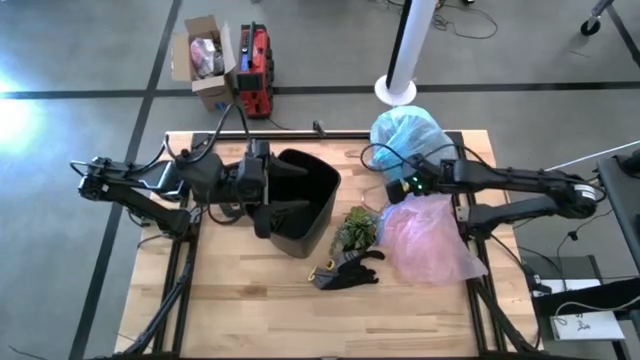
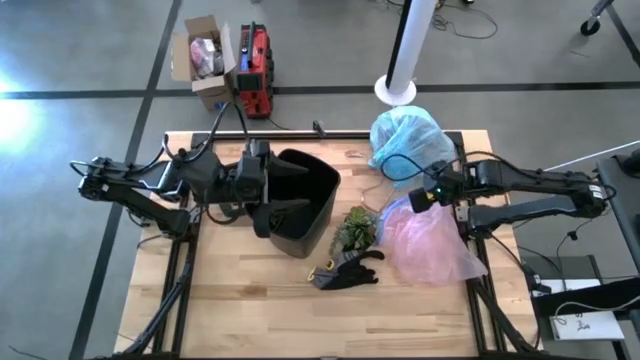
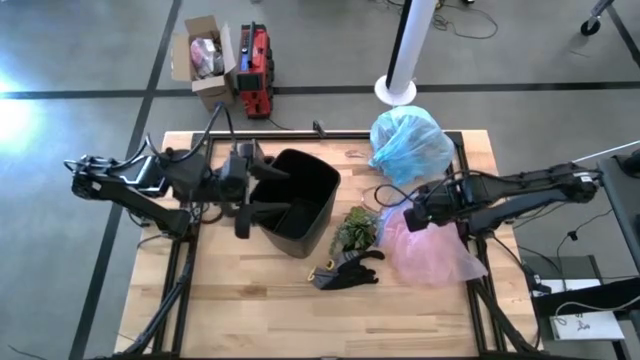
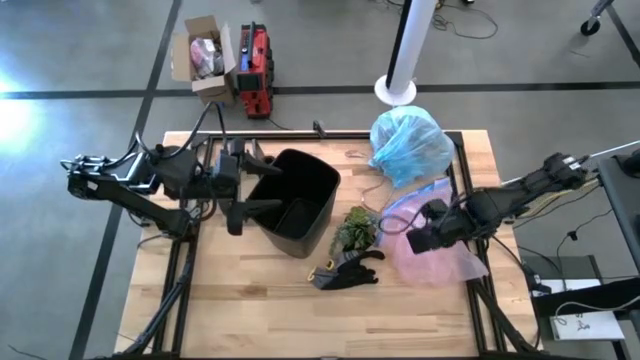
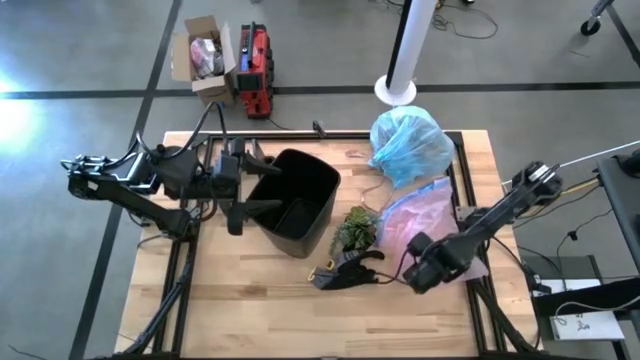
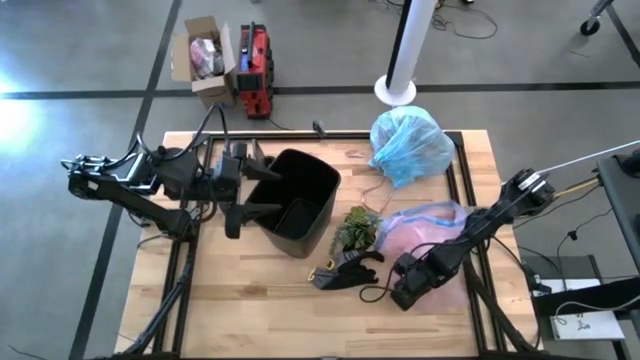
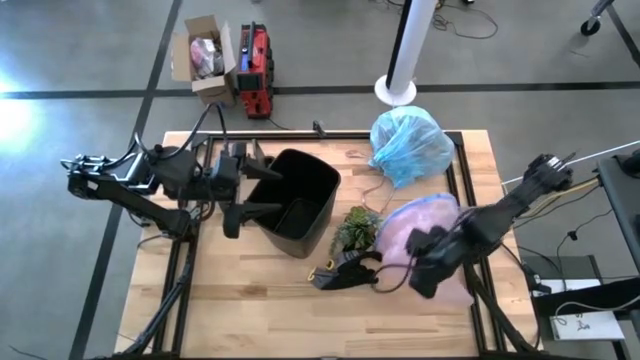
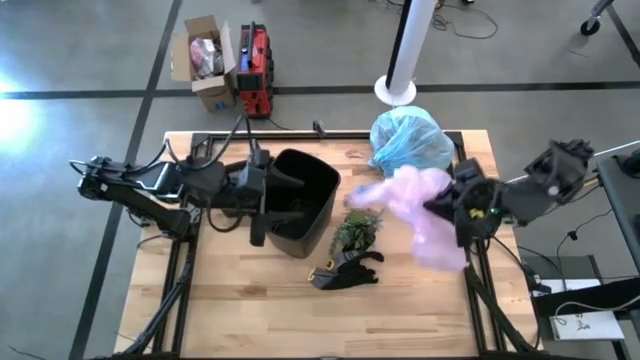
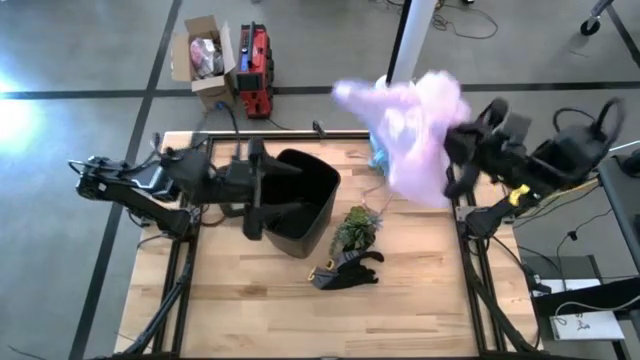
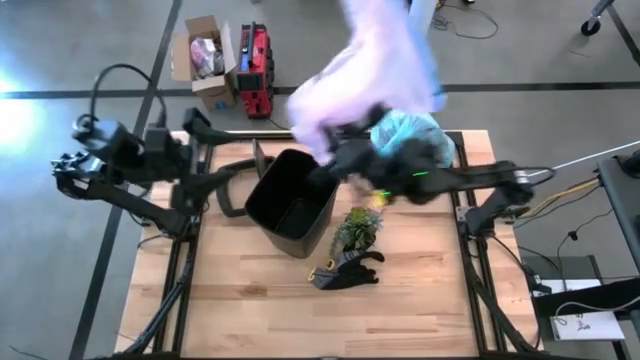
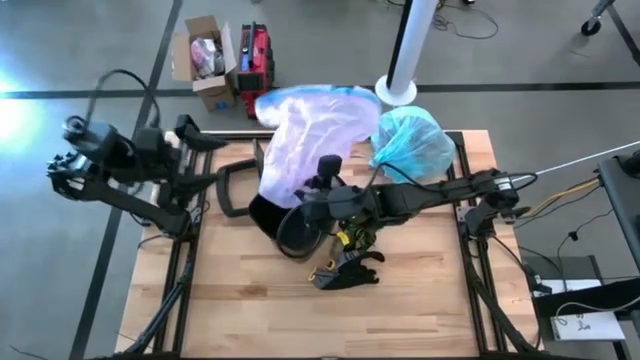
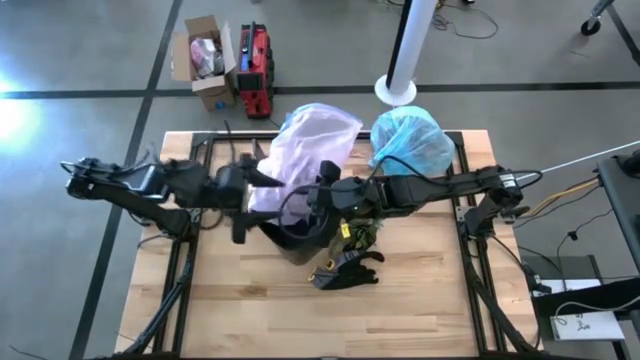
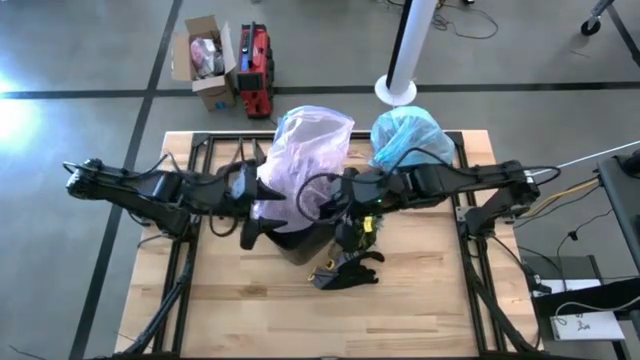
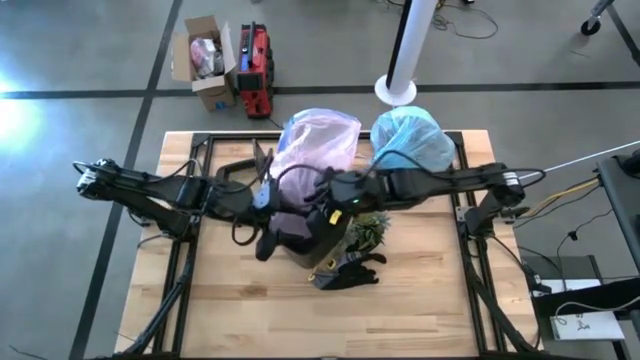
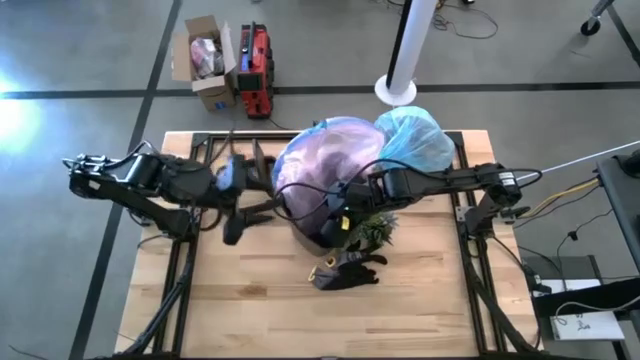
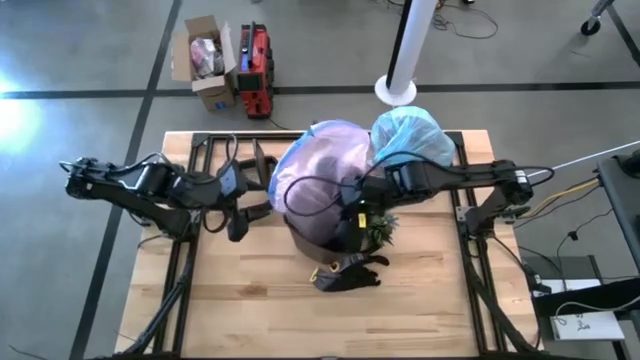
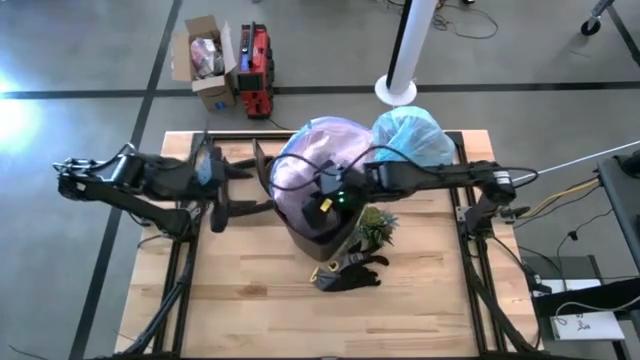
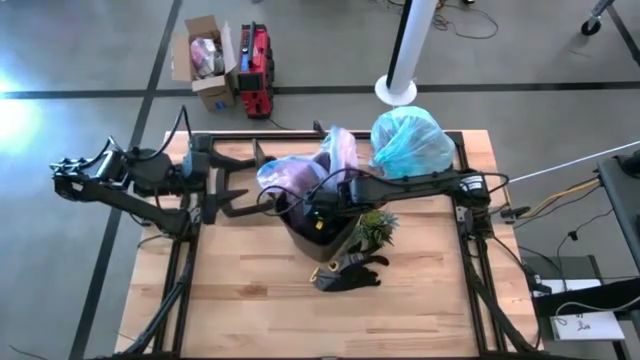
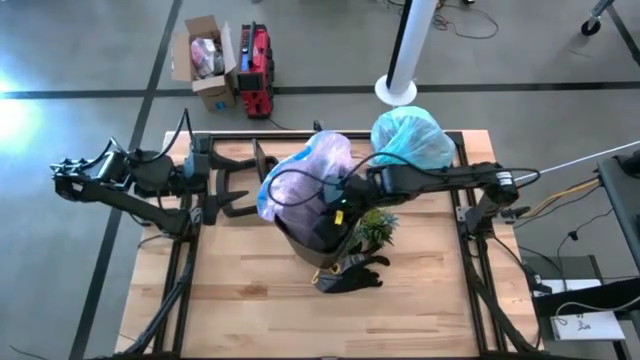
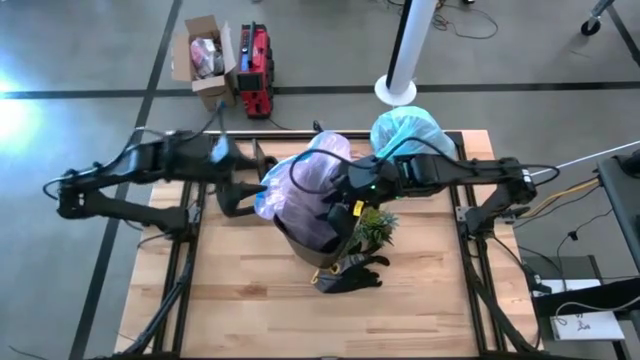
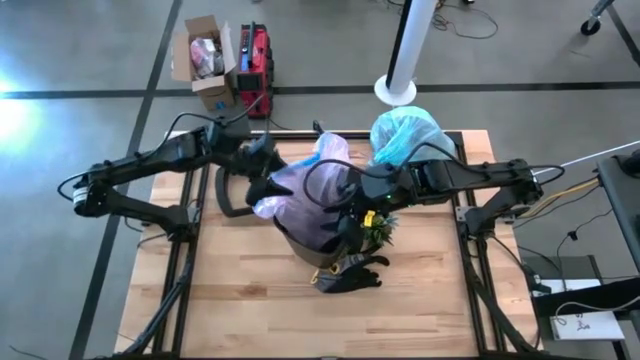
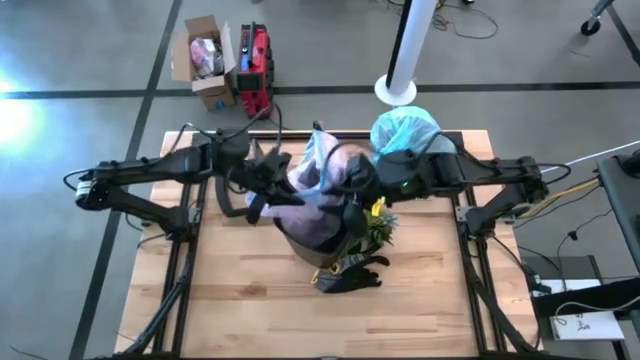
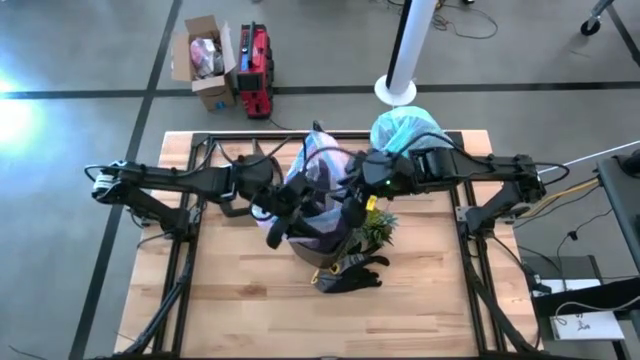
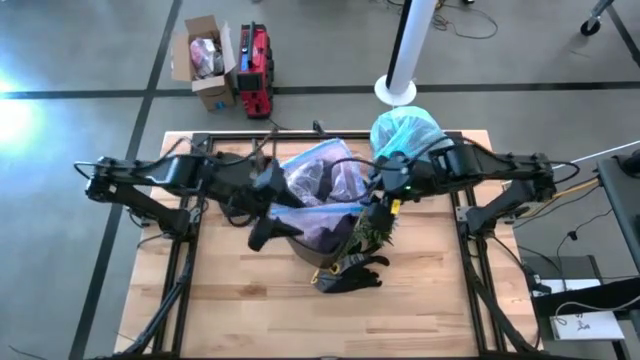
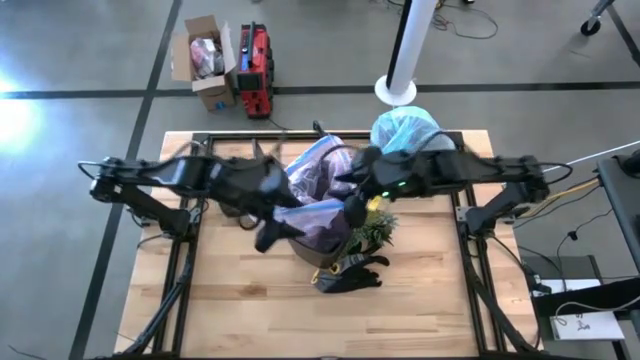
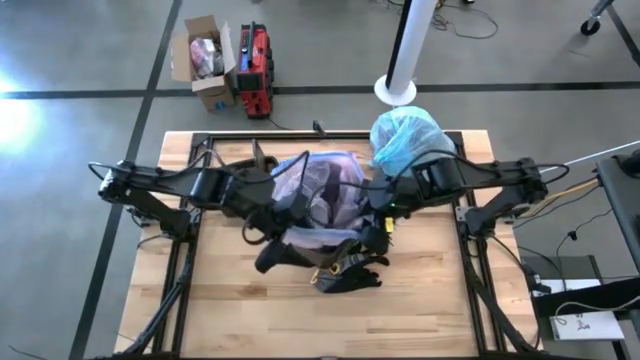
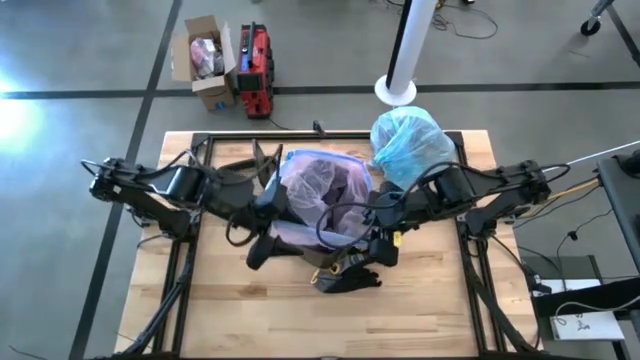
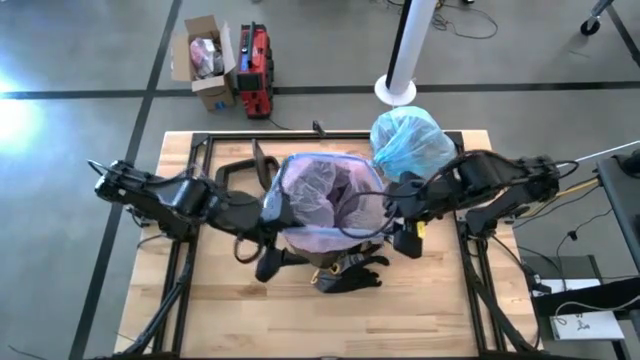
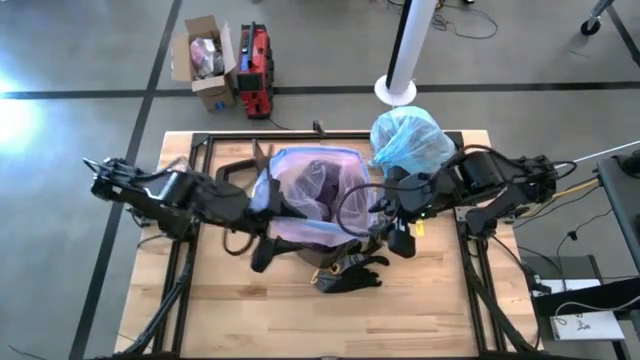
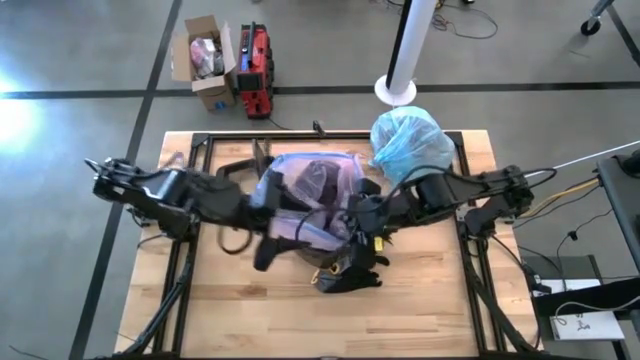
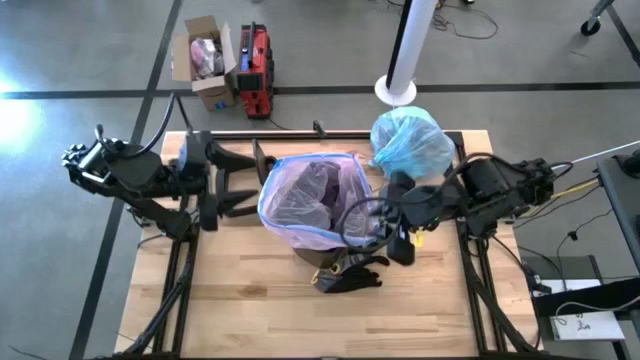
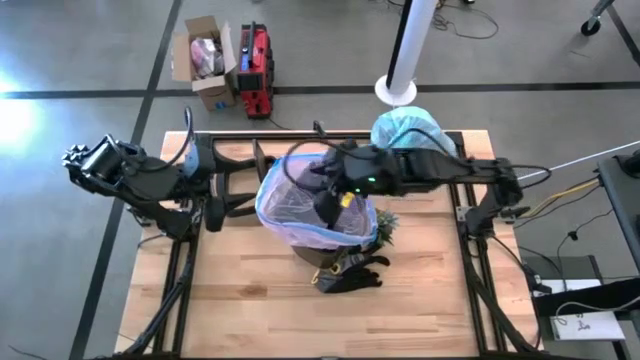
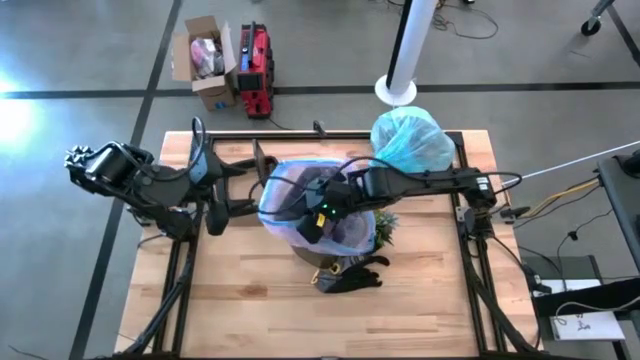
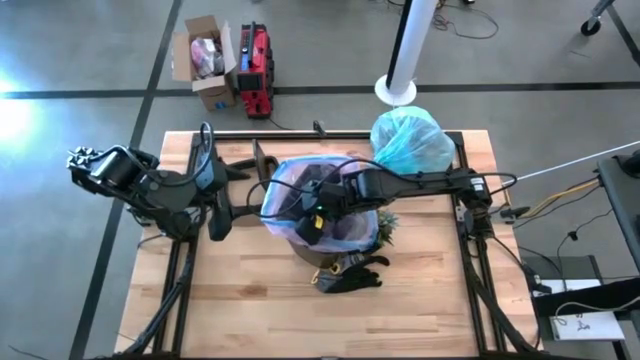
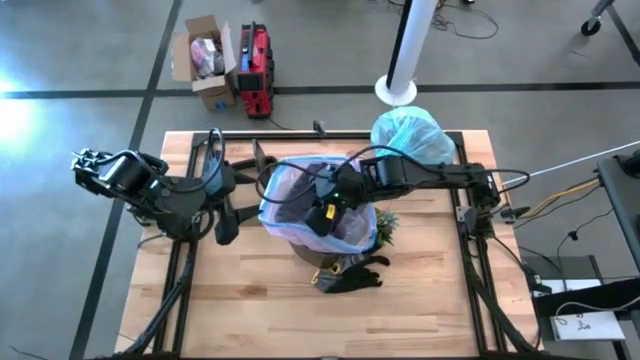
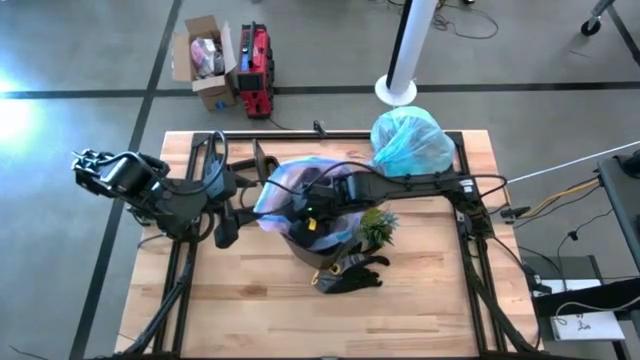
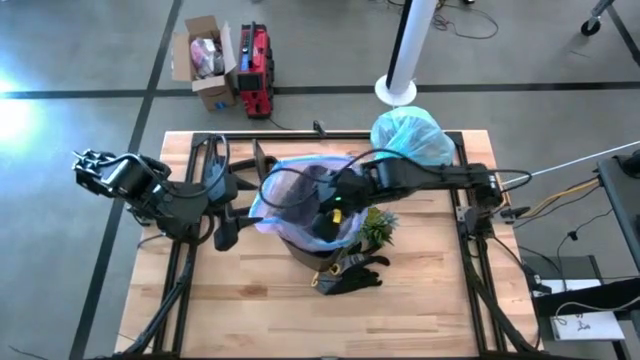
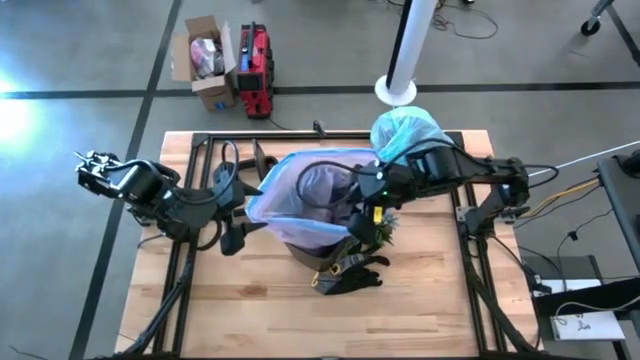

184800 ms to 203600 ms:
Task: place trash/remove bag and relplace
Insert the trash bag into the trash bin

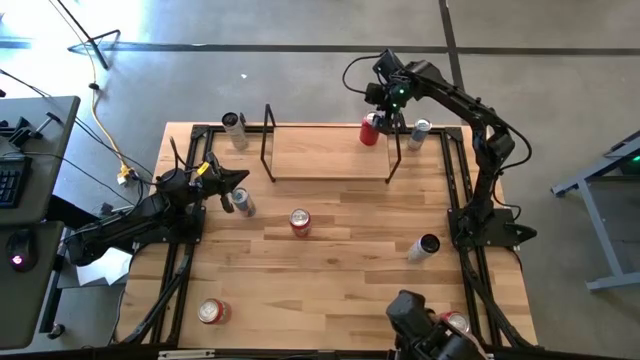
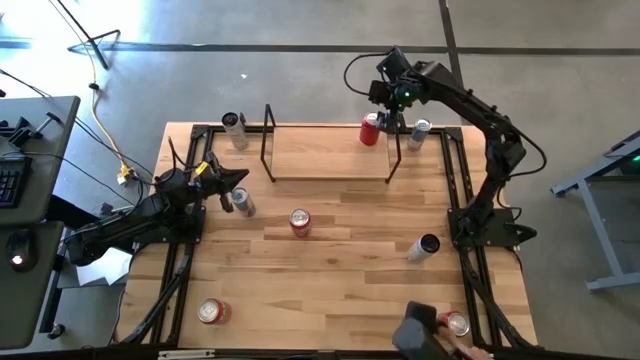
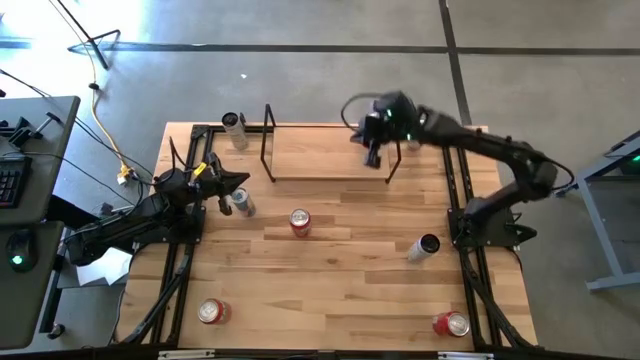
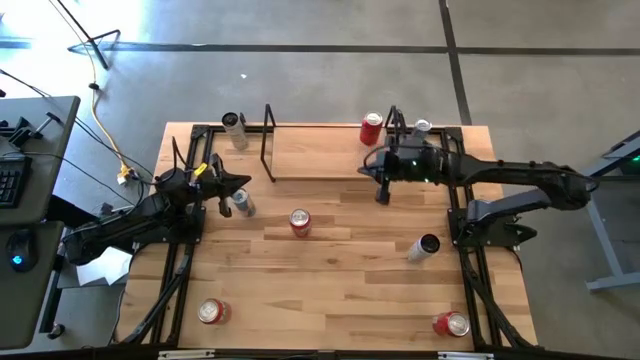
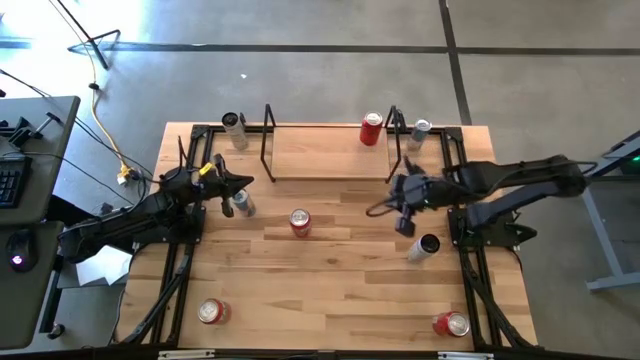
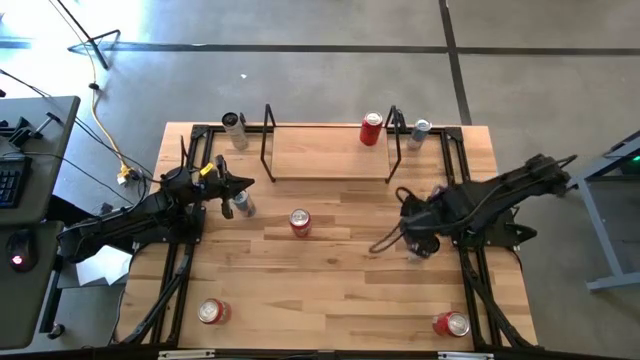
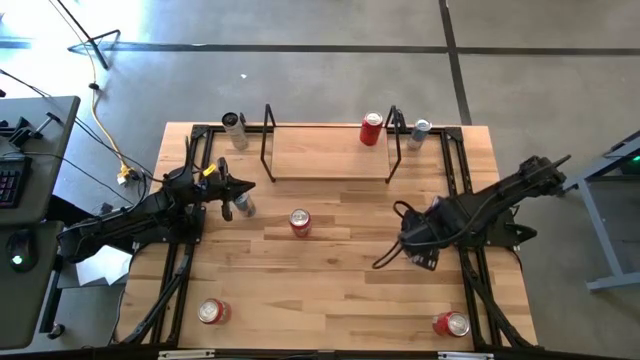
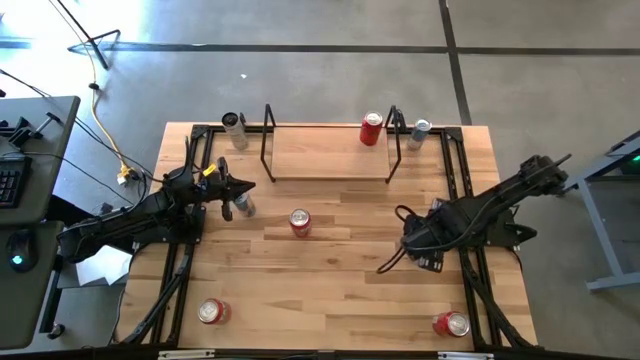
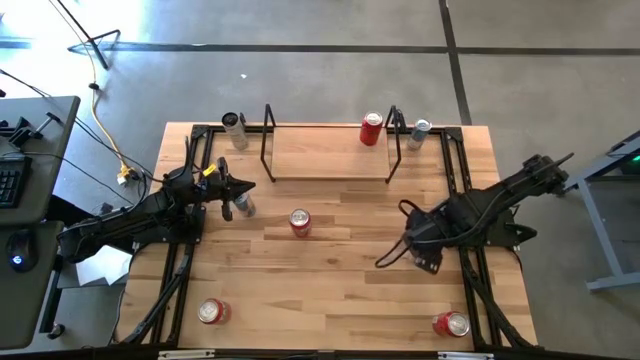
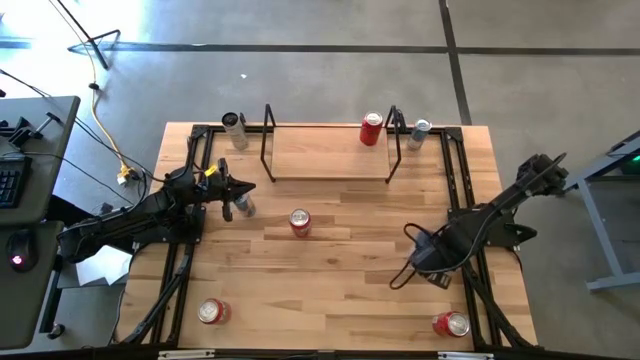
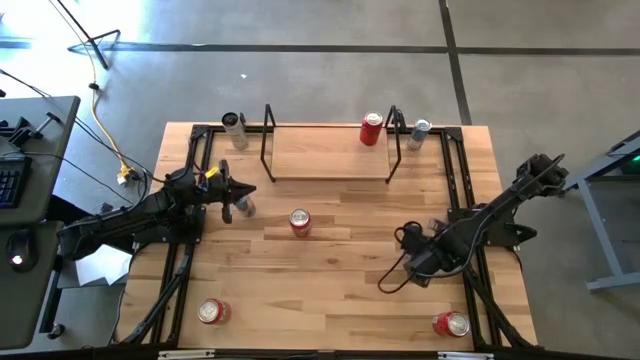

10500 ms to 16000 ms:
Task: Place canned beverage on shelf
Put the bottom white-yellow soda can on the shelf
